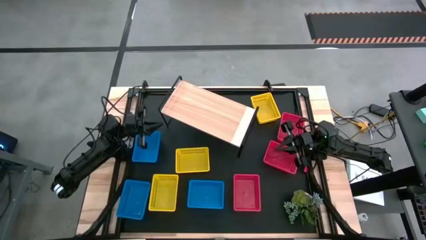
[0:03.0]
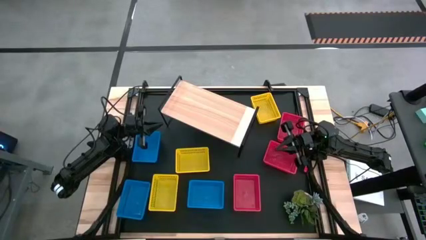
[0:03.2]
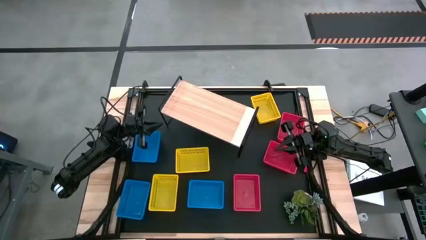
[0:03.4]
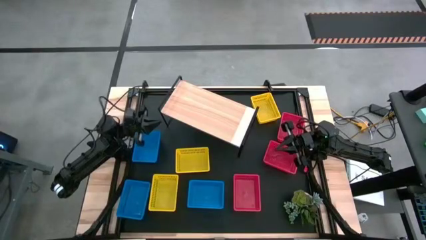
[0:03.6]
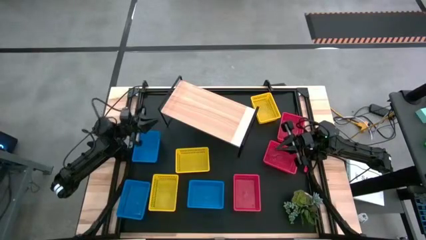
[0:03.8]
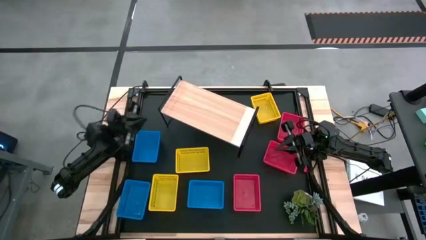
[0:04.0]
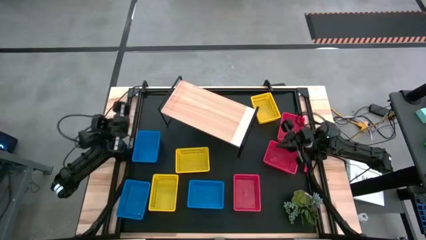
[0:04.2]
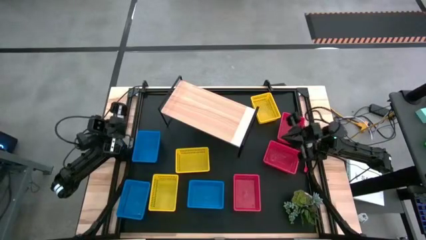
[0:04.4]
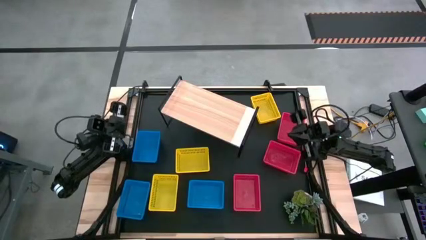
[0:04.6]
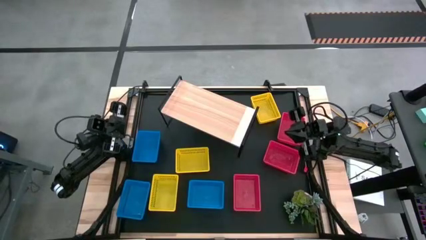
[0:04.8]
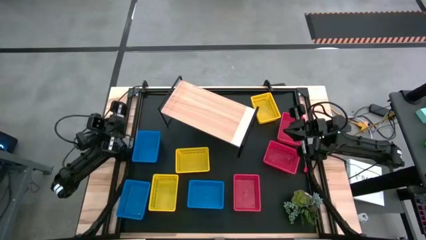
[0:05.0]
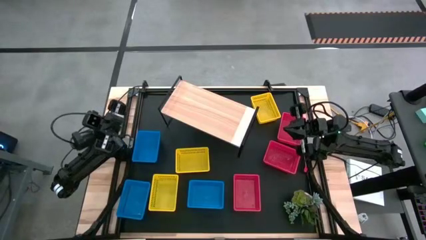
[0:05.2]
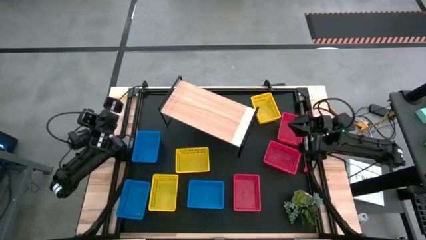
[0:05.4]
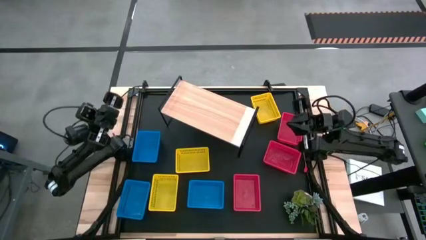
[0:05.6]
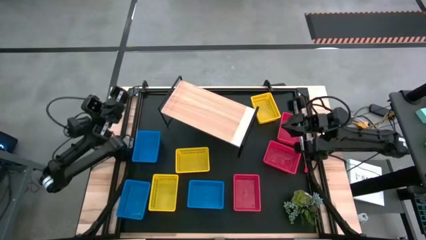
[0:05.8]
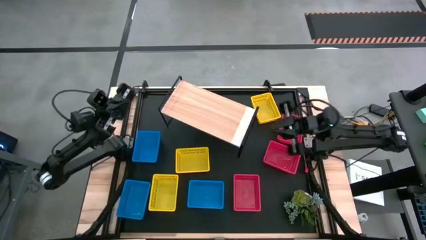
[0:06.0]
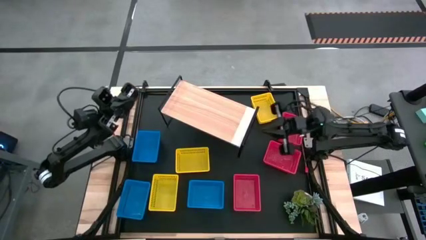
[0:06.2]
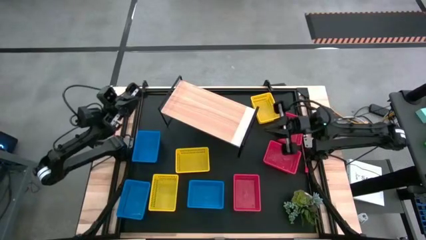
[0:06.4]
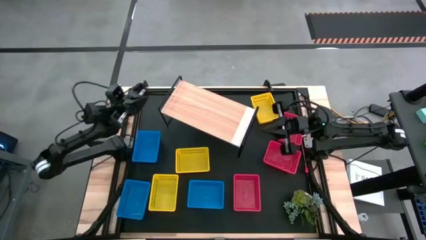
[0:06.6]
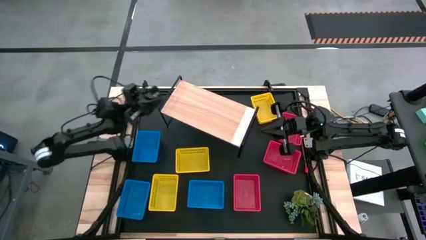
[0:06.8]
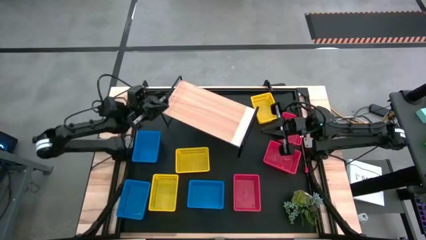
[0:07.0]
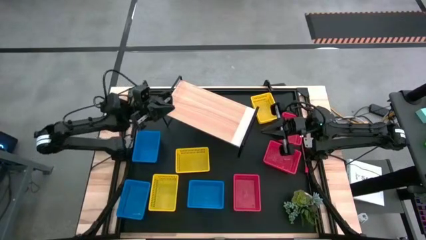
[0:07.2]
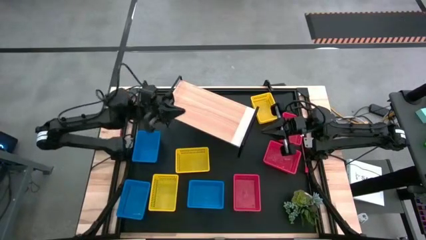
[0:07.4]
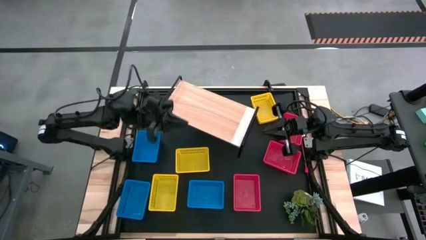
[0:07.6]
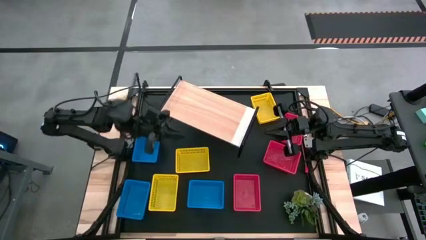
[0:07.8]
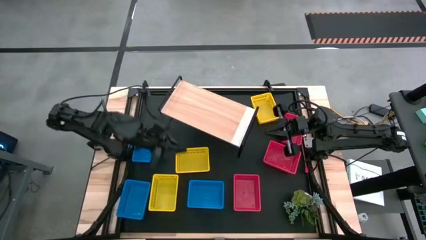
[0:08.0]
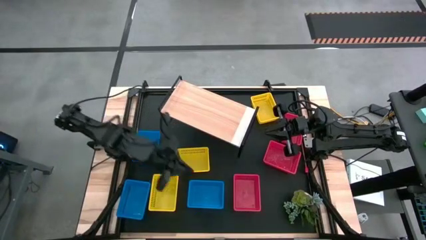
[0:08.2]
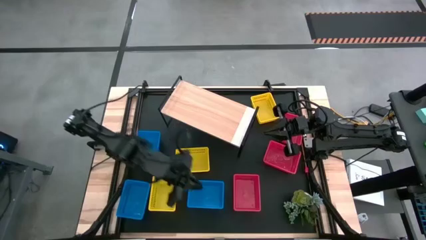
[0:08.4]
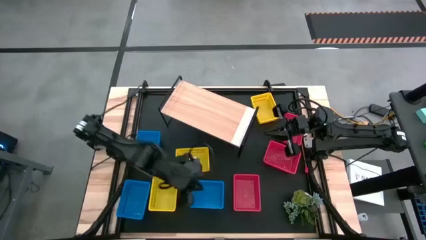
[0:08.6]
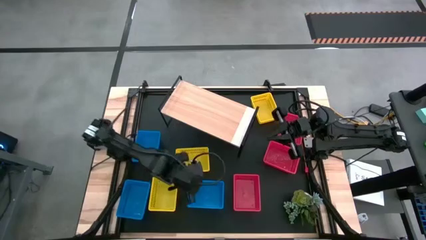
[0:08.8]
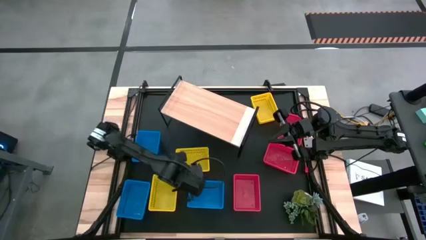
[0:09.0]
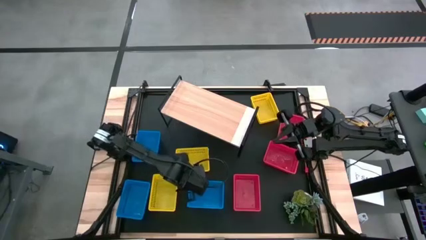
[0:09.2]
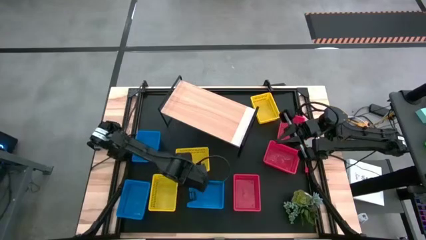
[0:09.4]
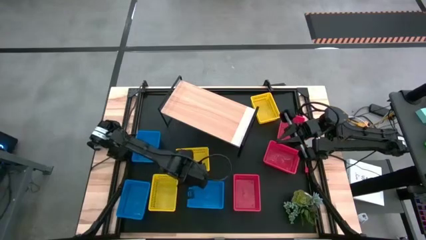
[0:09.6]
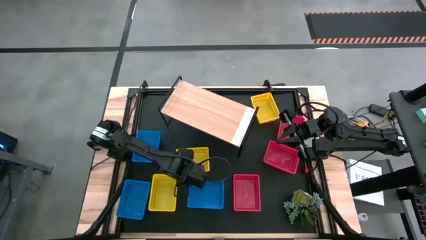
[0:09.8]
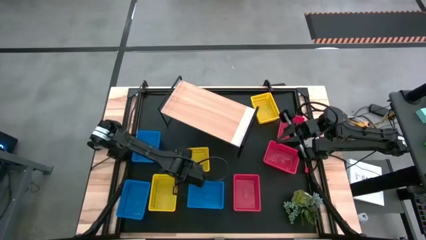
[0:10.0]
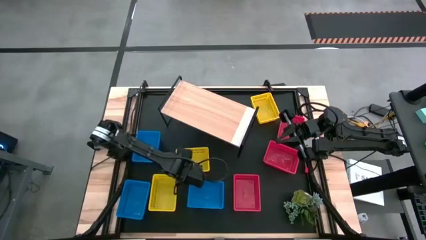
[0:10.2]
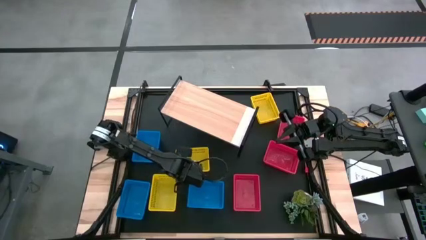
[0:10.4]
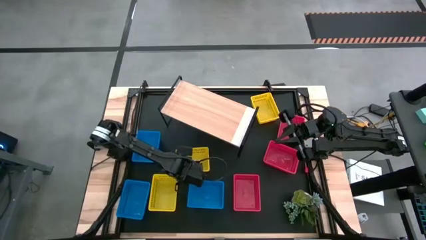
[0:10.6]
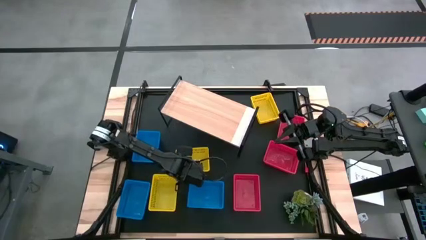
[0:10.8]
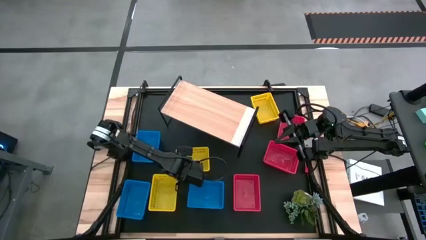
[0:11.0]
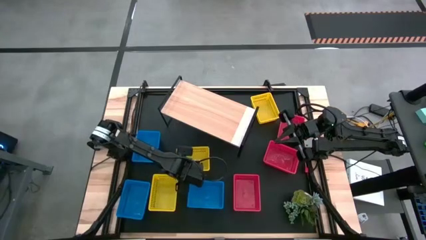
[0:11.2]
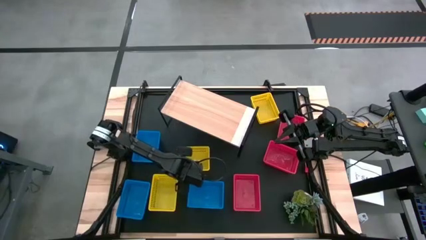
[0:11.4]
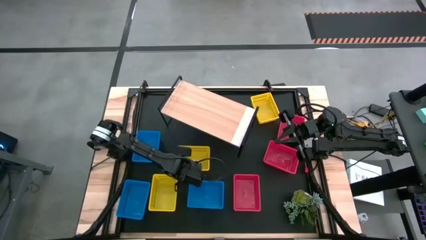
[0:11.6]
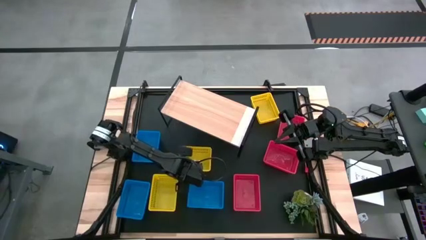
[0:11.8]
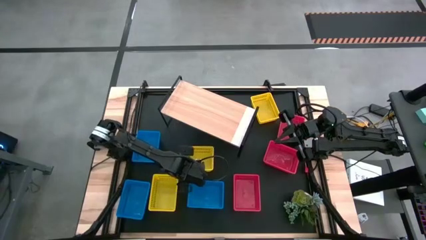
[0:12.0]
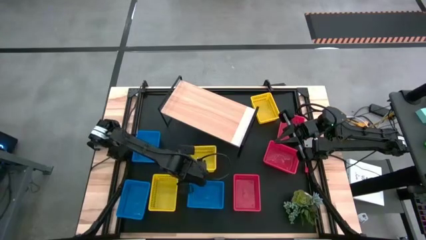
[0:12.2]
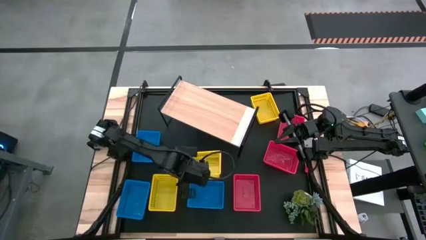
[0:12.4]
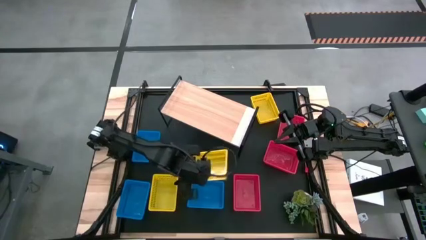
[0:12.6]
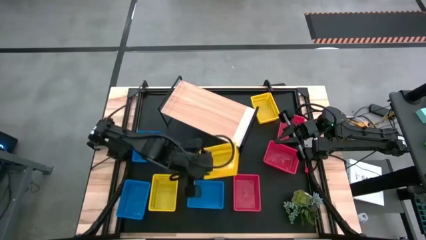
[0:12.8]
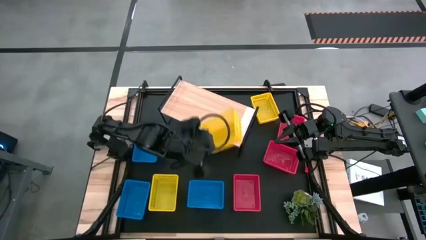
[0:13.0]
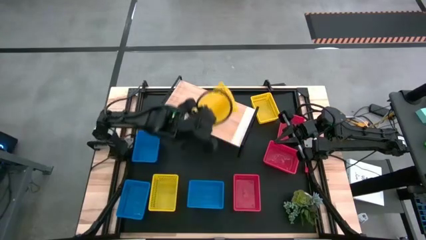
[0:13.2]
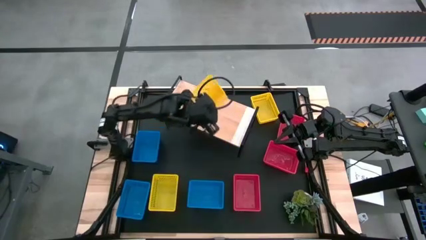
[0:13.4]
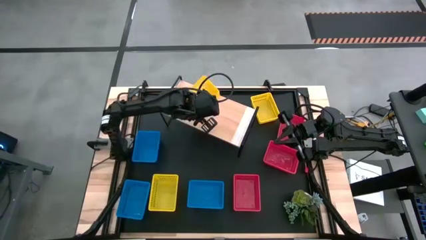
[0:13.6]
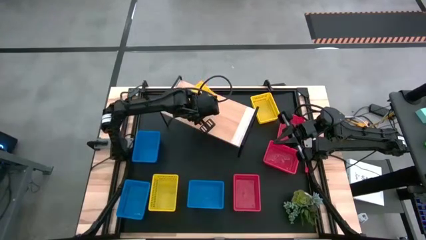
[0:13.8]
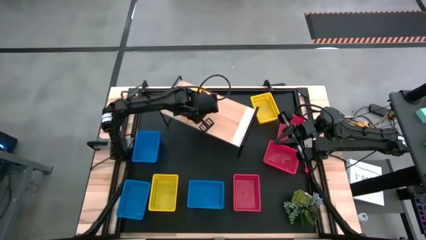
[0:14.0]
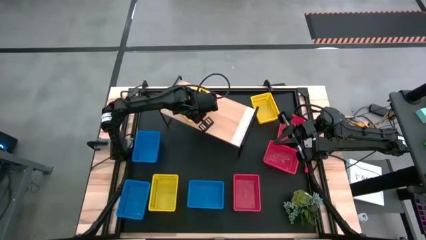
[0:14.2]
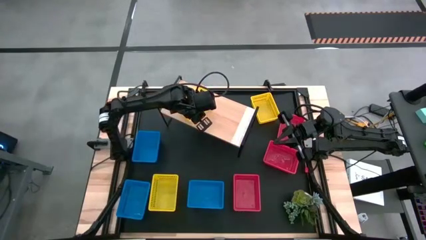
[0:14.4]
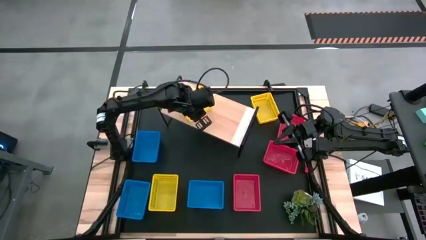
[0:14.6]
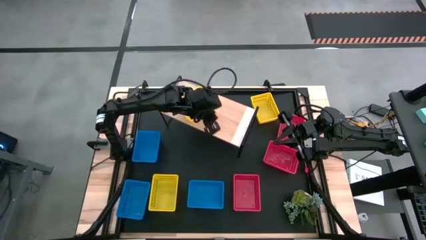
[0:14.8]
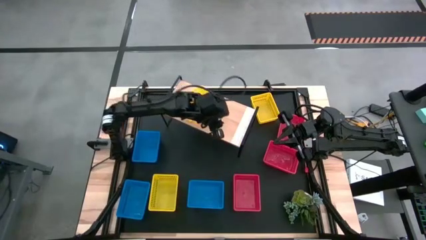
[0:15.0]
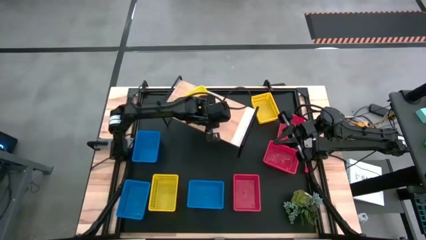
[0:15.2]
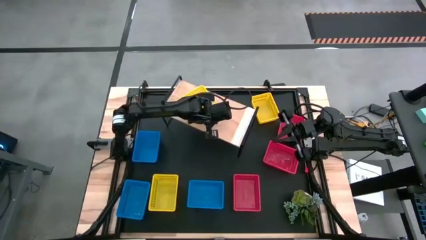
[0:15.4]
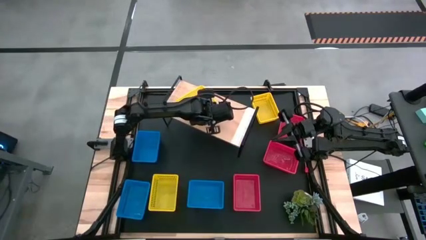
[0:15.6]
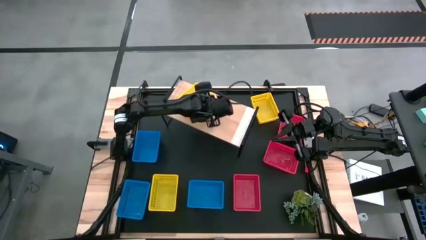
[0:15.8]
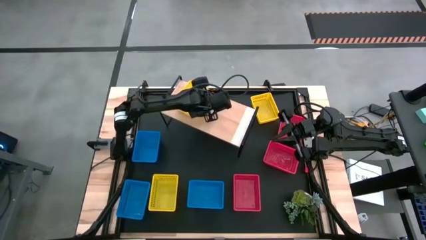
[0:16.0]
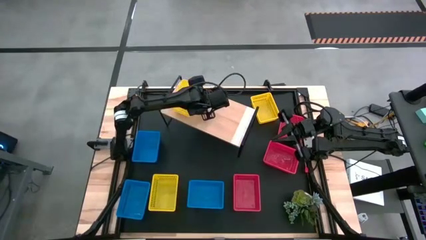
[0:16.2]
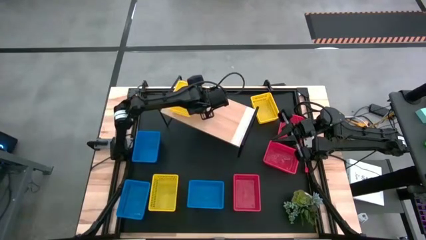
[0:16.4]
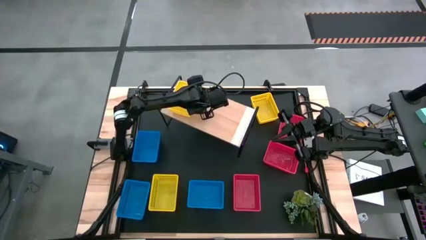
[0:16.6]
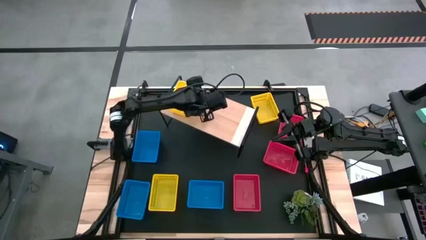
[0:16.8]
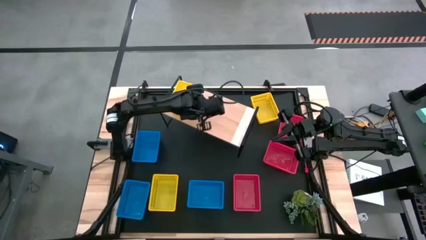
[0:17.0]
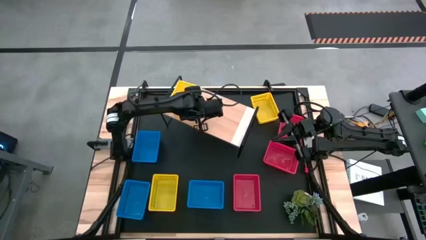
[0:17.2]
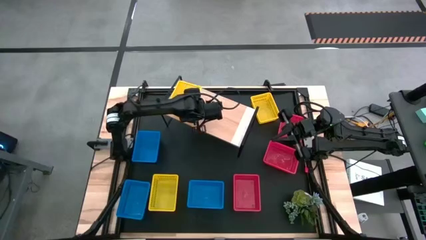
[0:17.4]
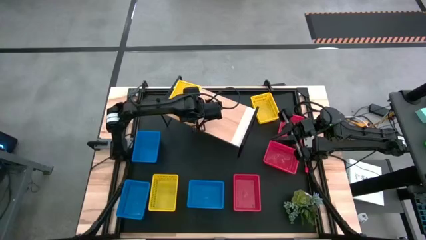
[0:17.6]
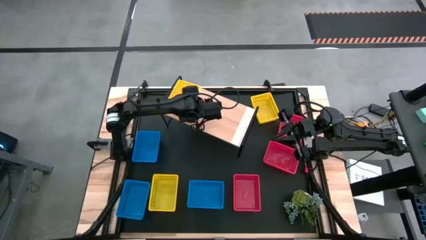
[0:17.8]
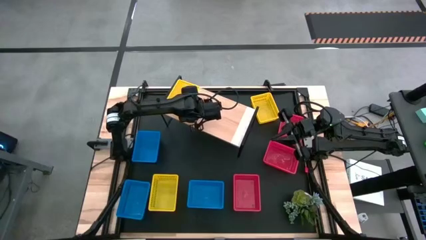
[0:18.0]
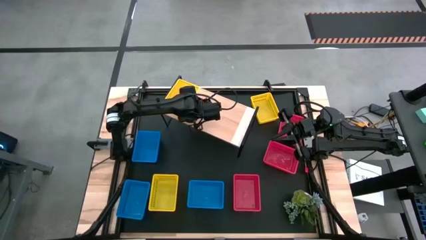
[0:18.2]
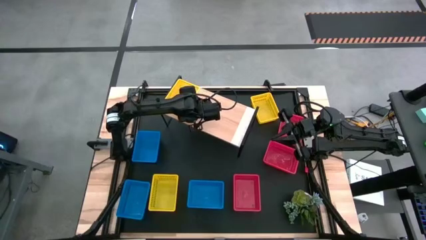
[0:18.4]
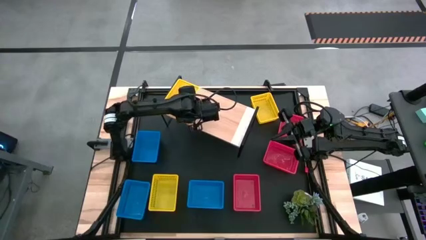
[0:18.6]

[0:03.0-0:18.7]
Task: Stack baskets on shelf by color
Put the middle yellow bin on the shelf
